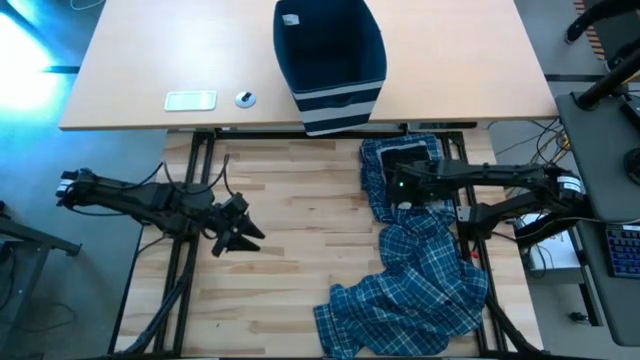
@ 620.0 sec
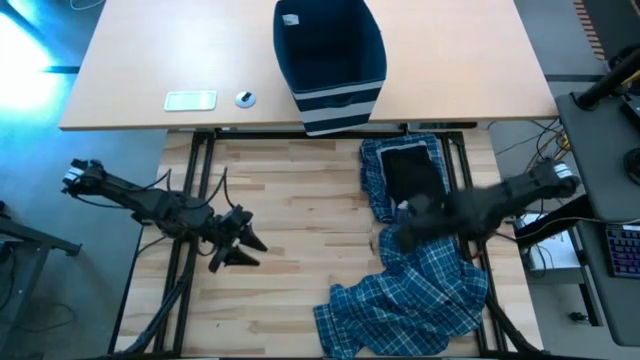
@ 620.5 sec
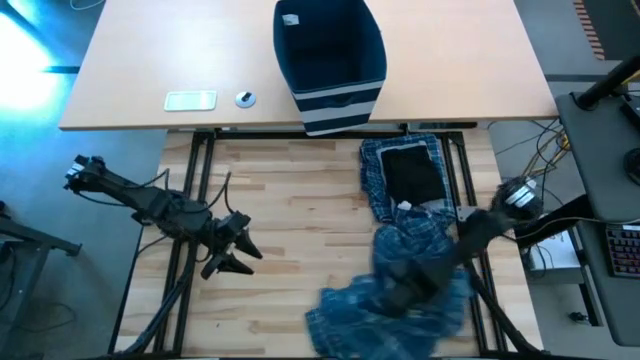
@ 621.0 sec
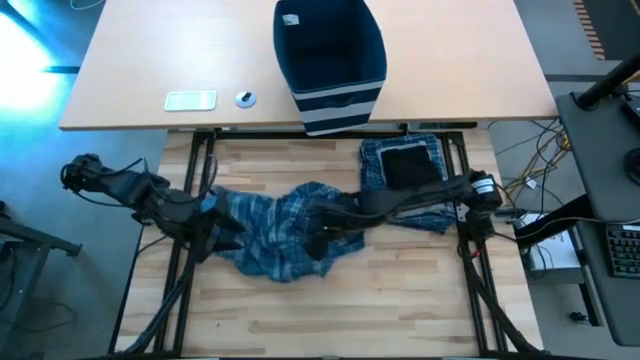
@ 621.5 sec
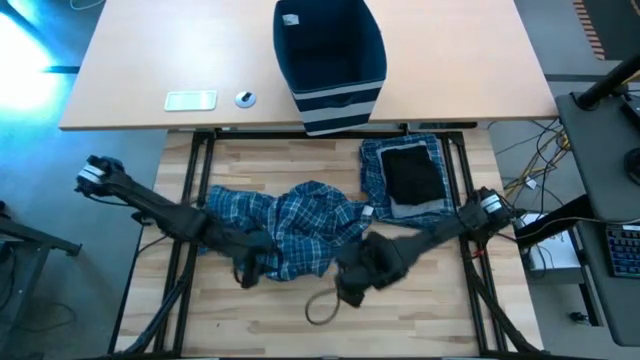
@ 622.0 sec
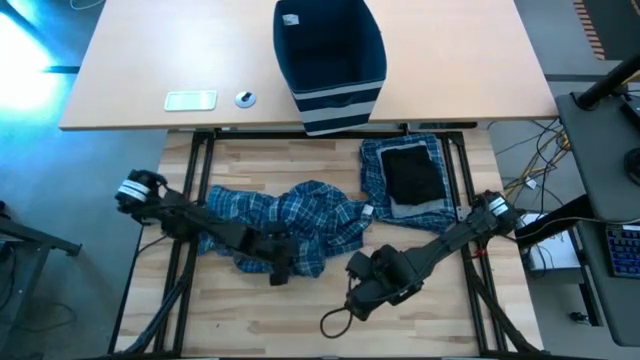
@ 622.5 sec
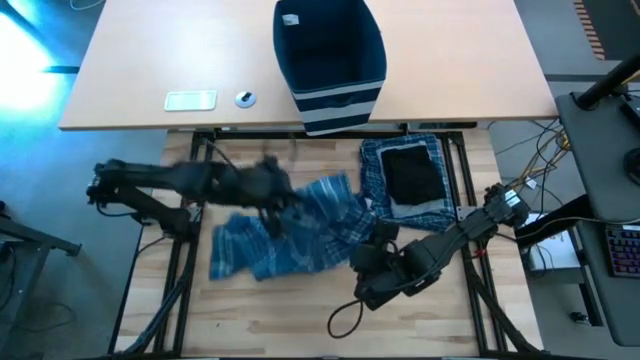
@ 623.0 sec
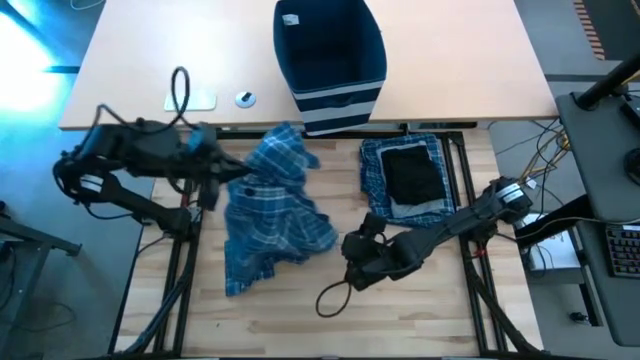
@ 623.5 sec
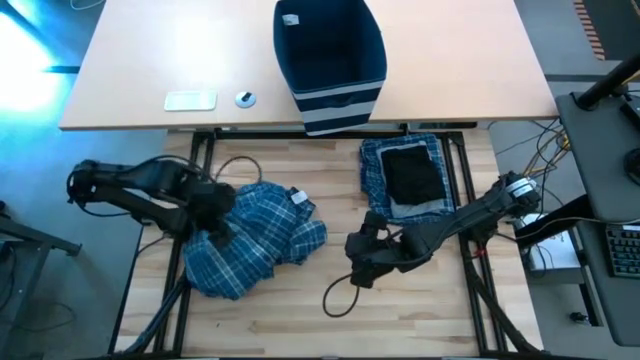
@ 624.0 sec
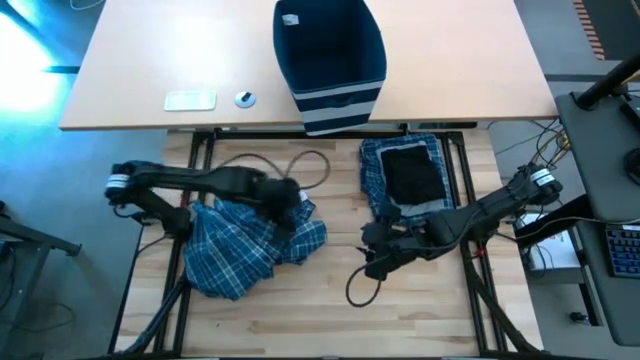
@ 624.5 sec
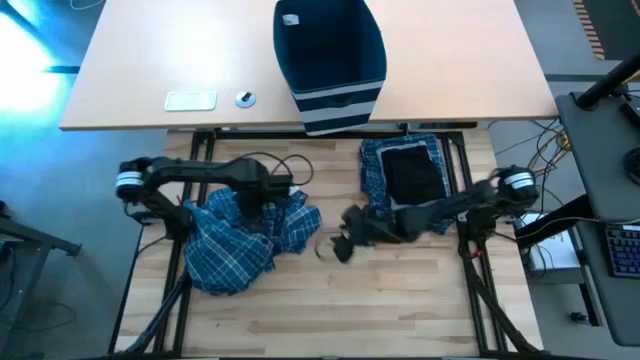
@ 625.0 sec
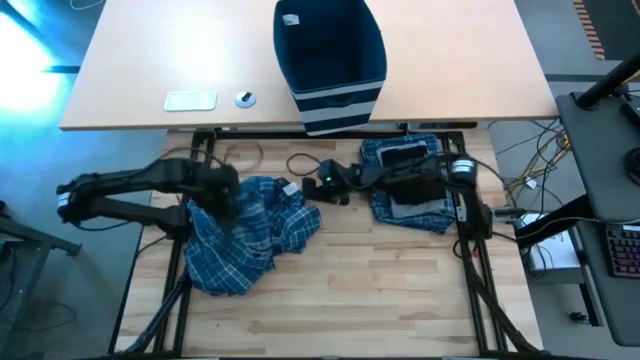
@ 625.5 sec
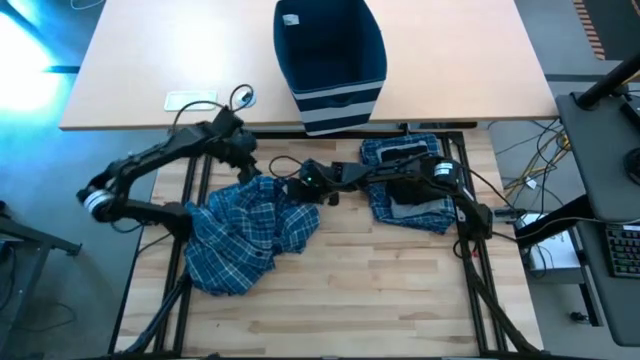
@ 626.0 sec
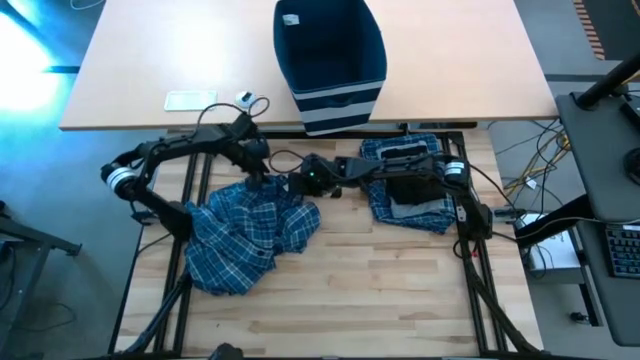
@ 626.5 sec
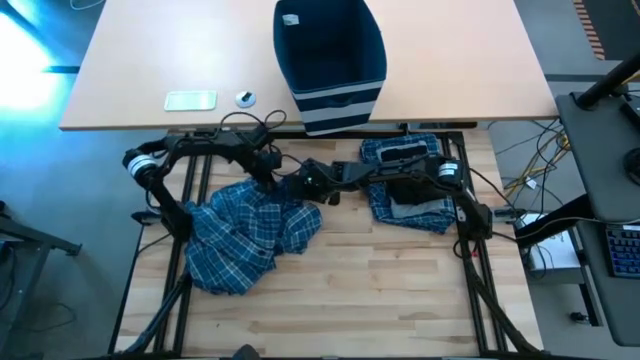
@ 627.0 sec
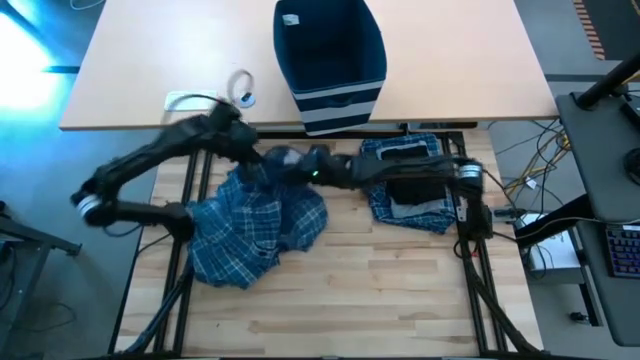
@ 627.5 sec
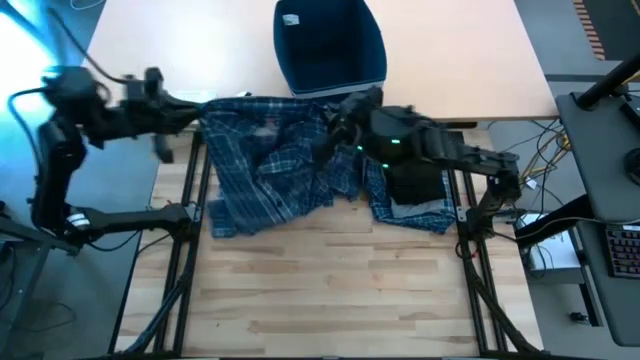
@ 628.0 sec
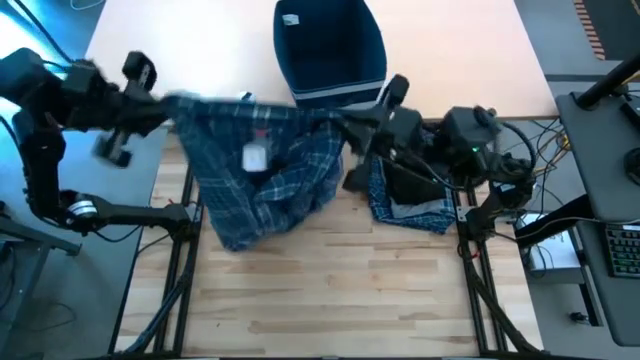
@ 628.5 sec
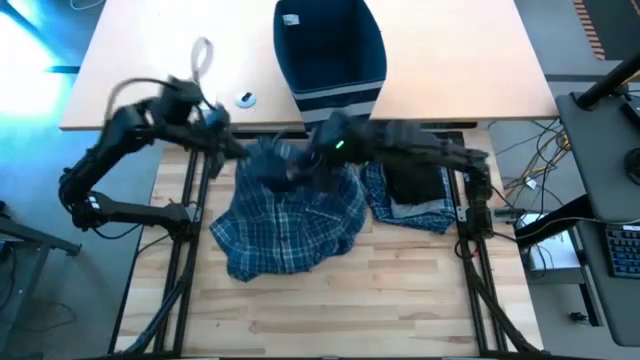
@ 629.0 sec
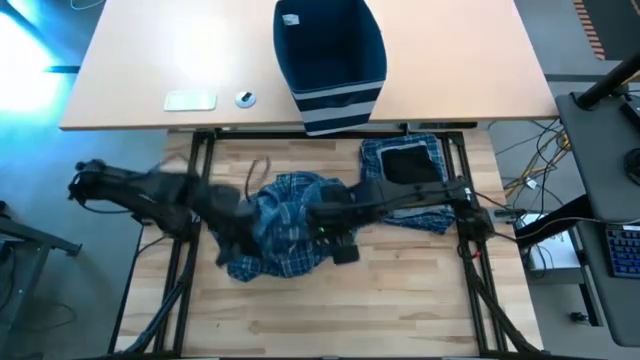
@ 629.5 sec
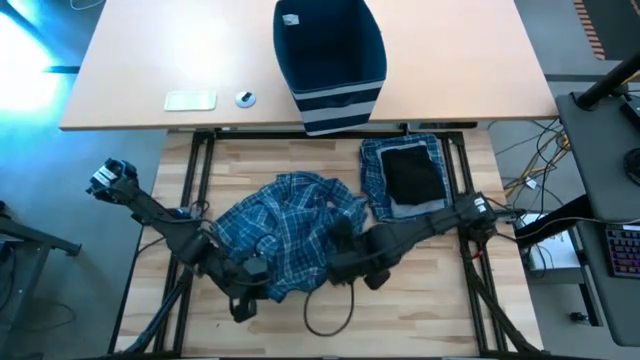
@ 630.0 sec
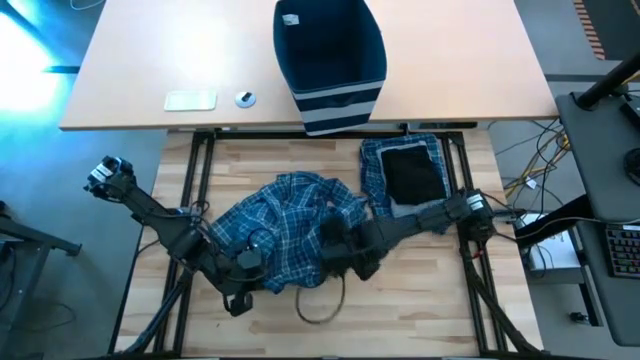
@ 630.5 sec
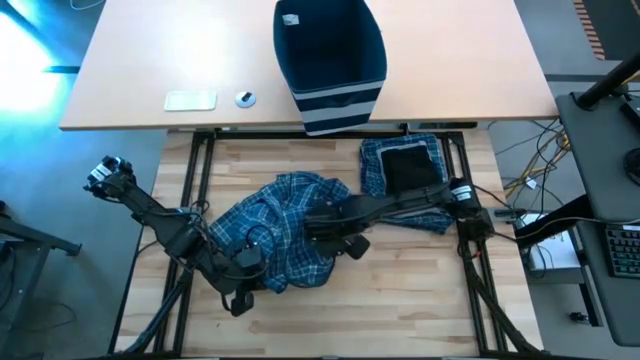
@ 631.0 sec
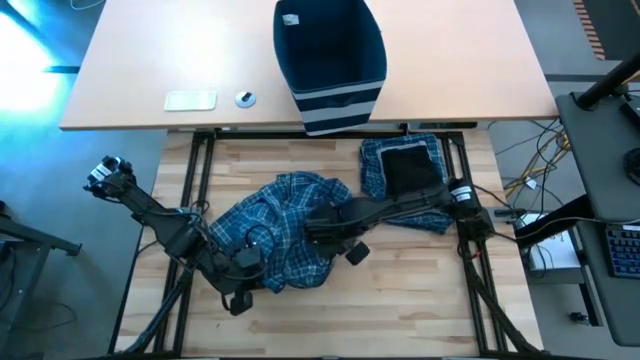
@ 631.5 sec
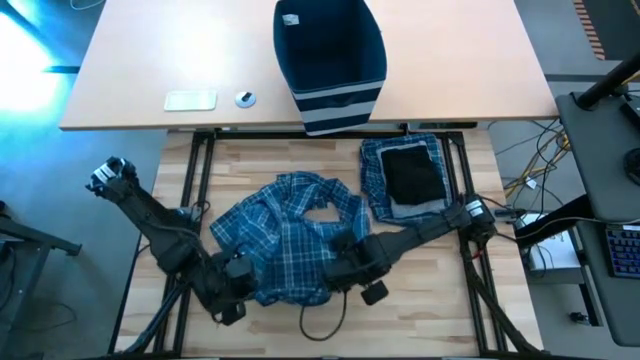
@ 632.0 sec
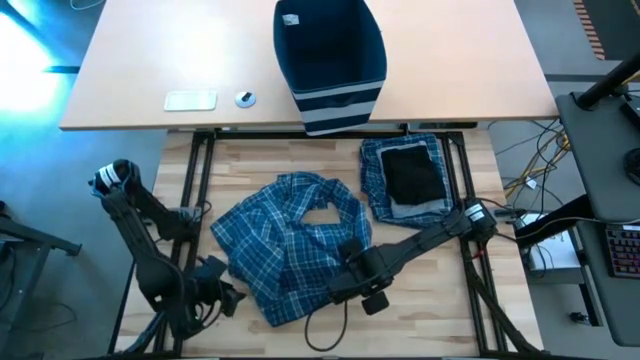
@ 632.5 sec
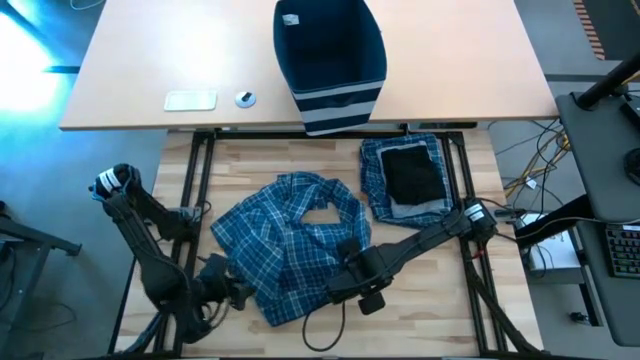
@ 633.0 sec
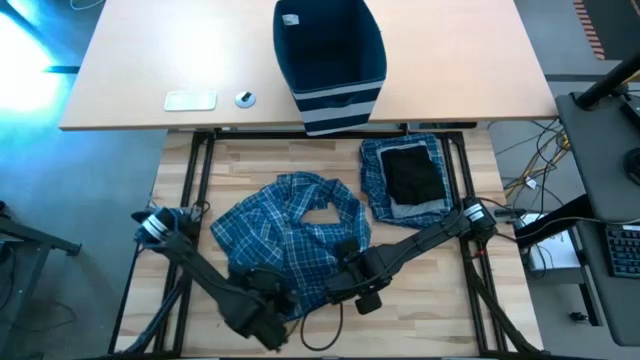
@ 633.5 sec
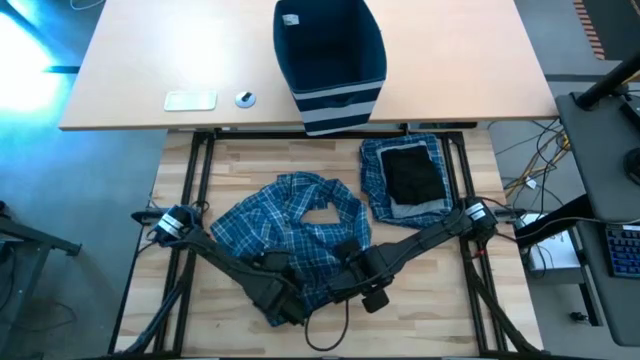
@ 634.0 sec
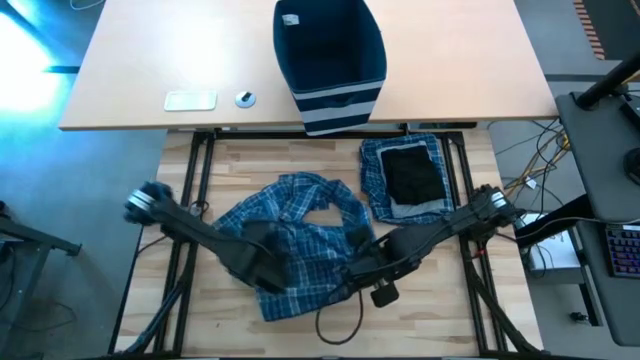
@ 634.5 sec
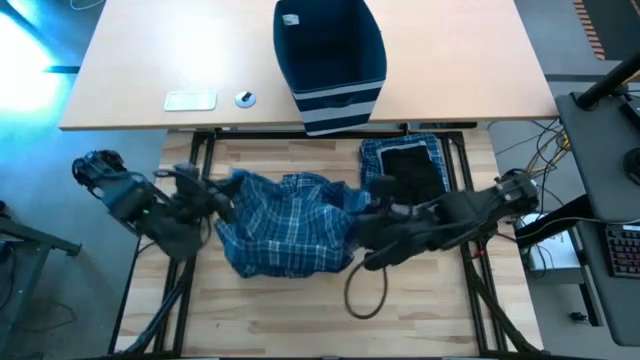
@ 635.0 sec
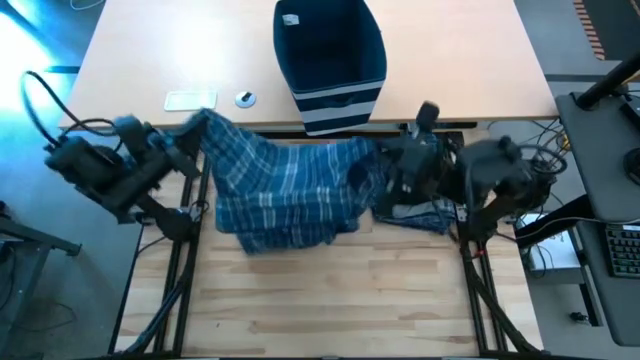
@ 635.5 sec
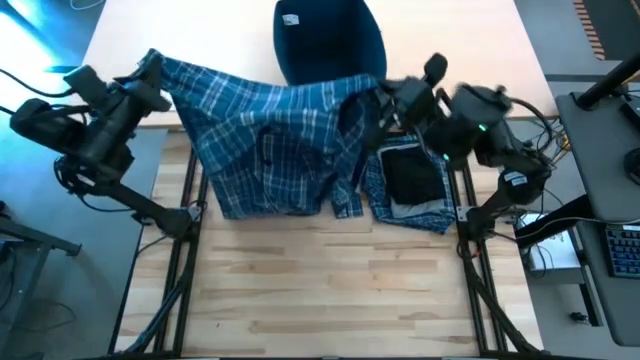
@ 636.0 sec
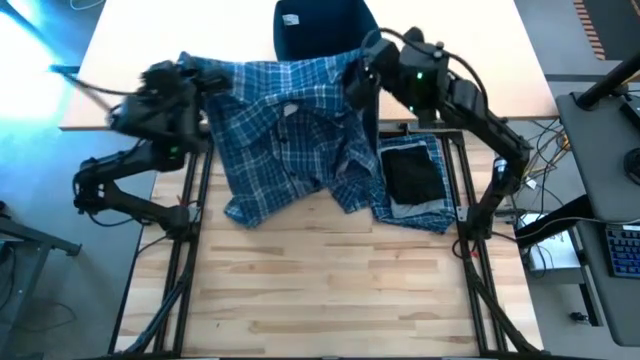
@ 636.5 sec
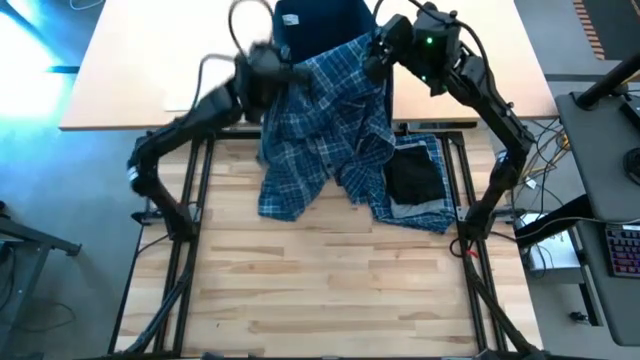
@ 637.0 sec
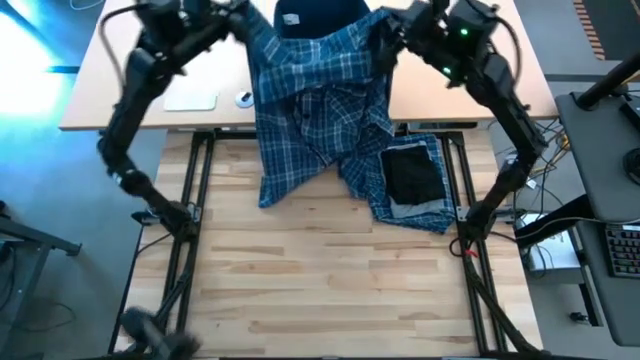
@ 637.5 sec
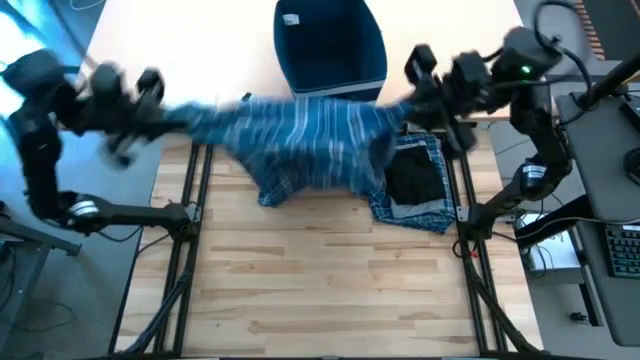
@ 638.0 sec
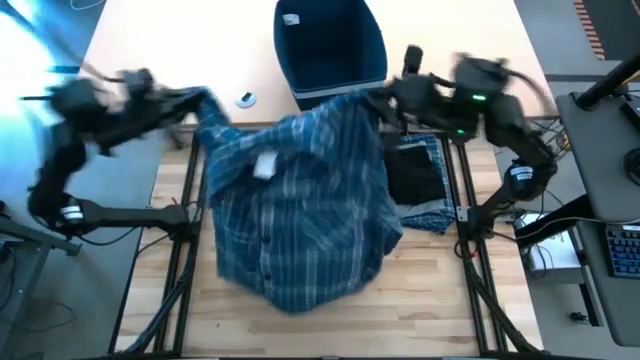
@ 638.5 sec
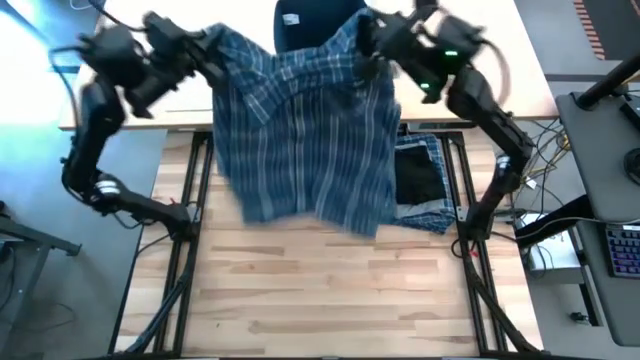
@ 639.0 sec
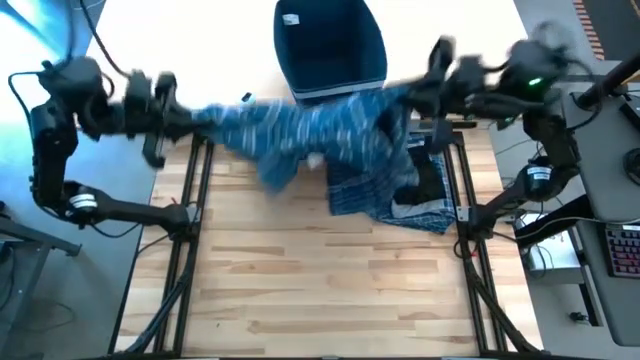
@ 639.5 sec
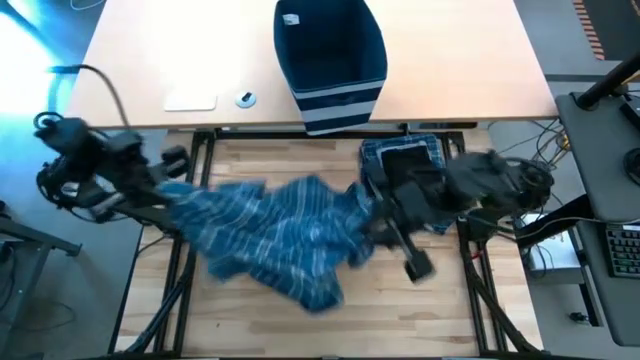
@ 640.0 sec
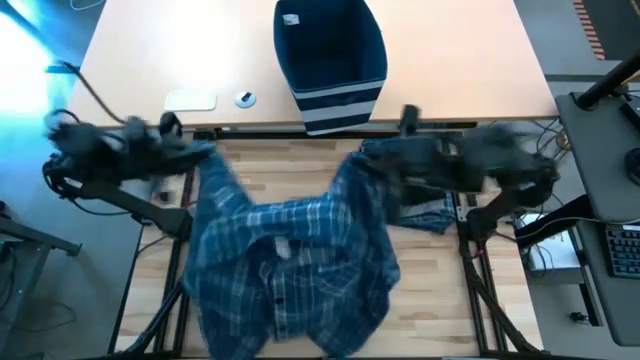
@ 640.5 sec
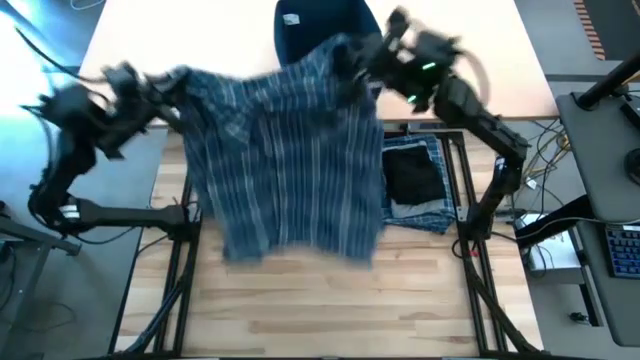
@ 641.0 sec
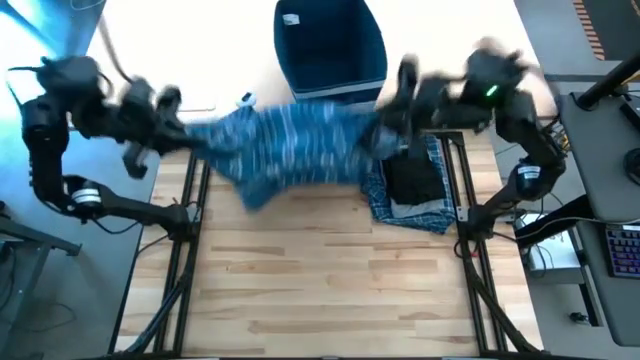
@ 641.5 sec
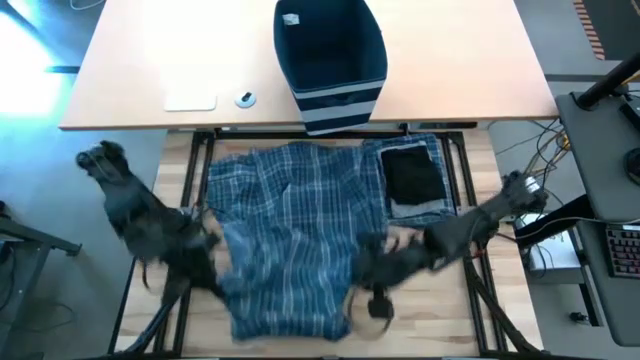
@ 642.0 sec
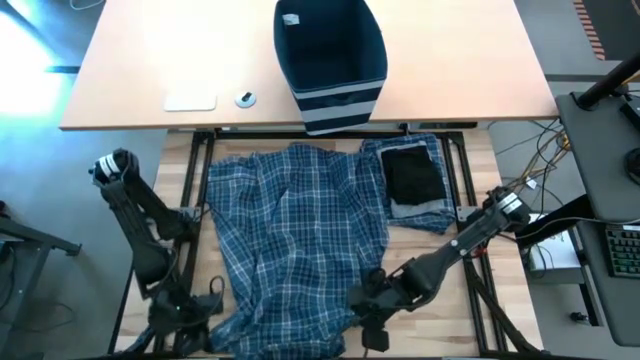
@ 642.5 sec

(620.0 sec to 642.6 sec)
Task: Fold Laundry from Bin
Fold the blue patterned long sleeve
